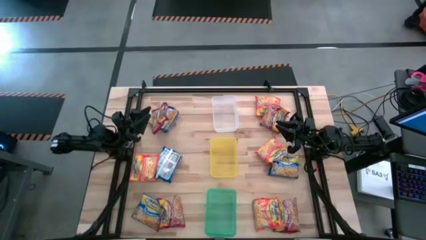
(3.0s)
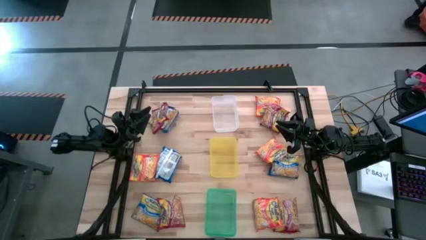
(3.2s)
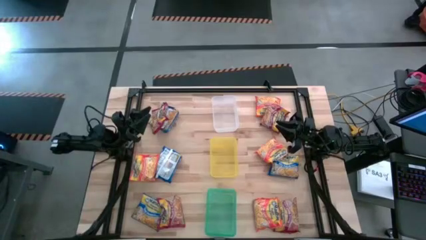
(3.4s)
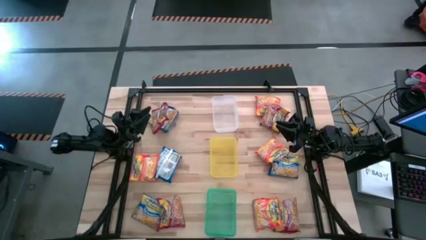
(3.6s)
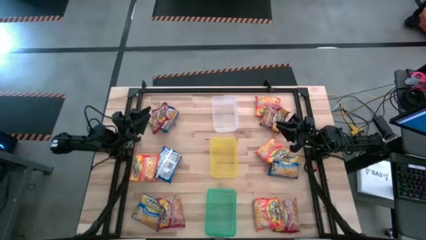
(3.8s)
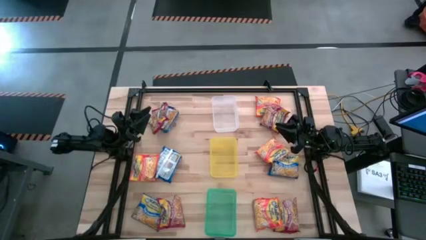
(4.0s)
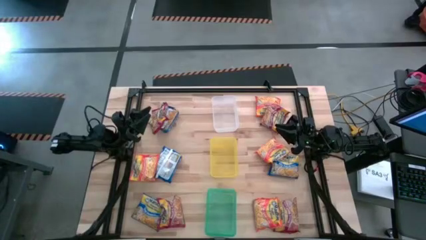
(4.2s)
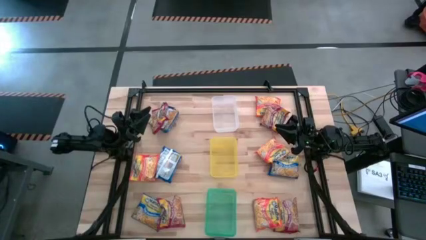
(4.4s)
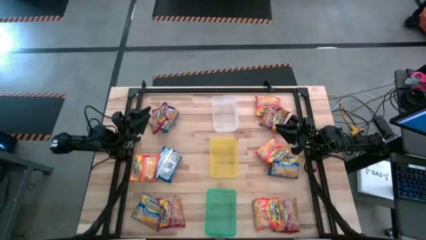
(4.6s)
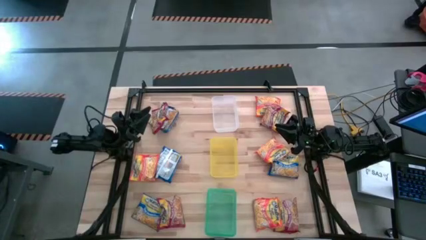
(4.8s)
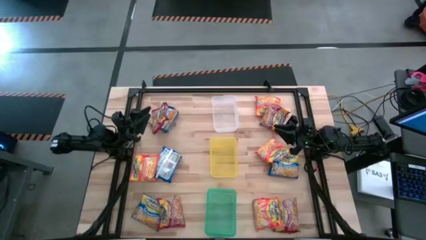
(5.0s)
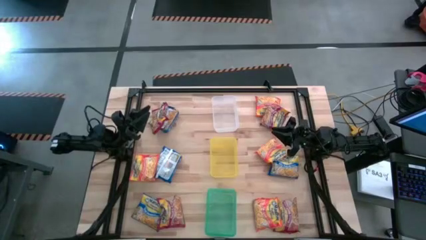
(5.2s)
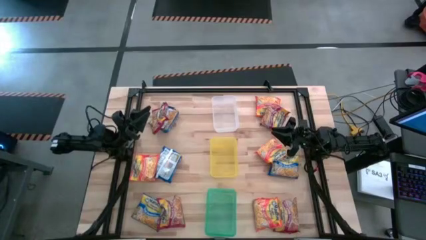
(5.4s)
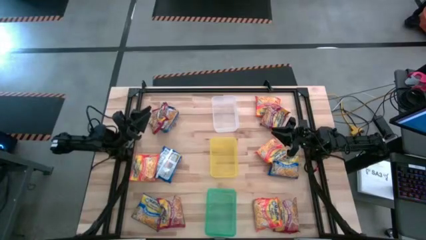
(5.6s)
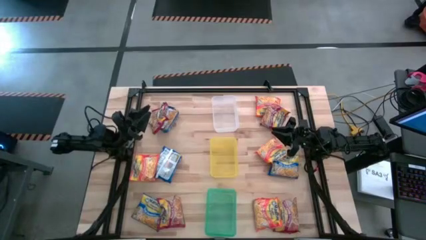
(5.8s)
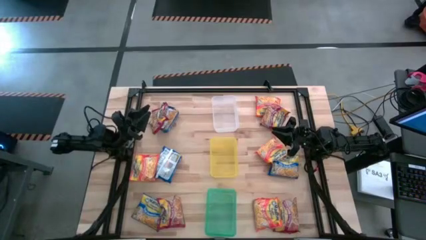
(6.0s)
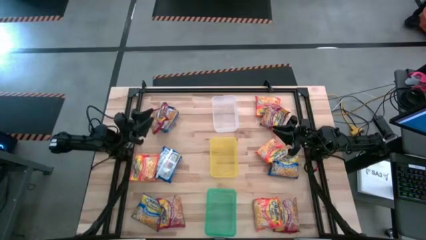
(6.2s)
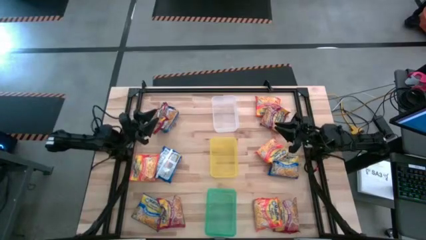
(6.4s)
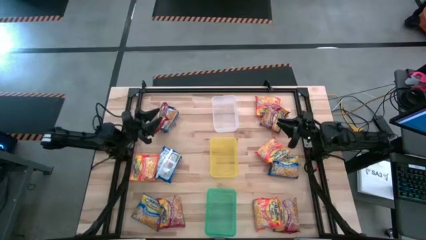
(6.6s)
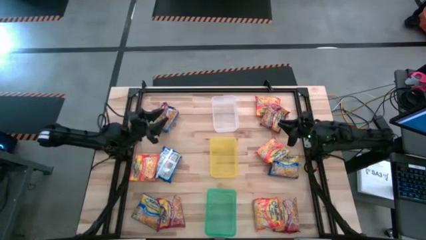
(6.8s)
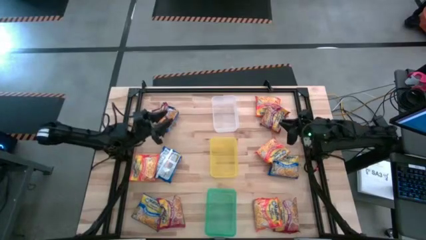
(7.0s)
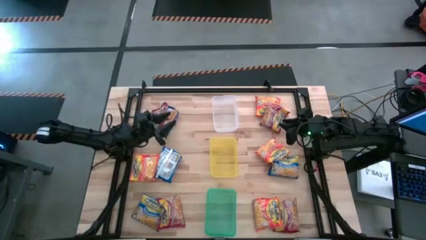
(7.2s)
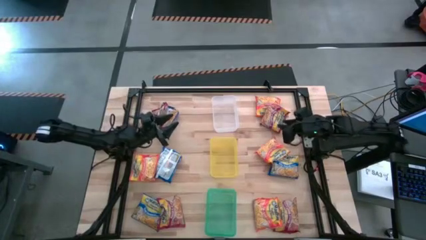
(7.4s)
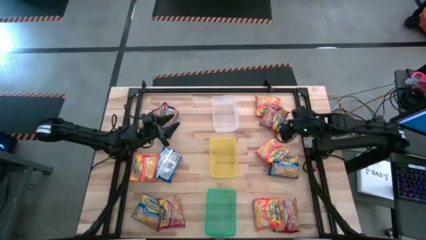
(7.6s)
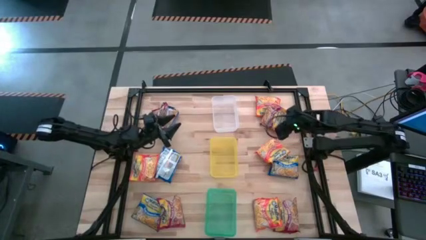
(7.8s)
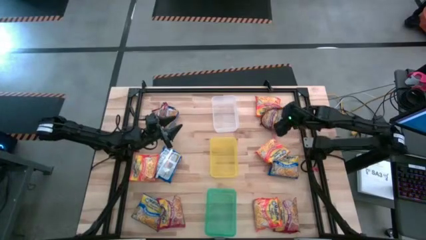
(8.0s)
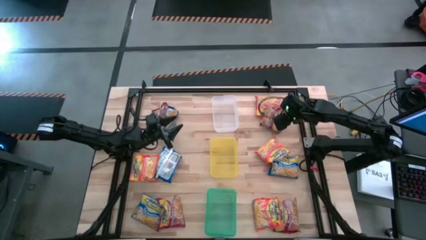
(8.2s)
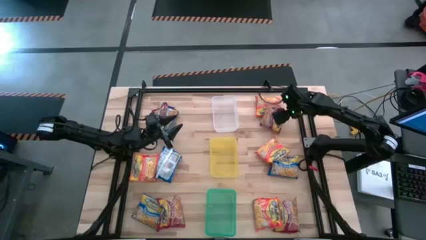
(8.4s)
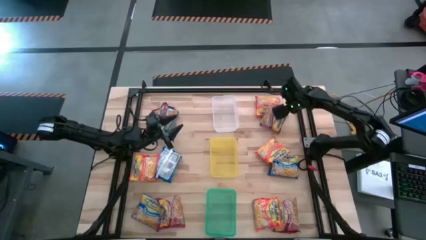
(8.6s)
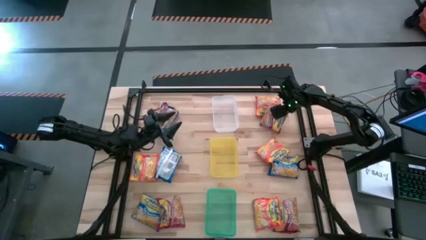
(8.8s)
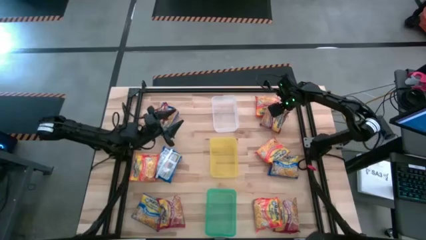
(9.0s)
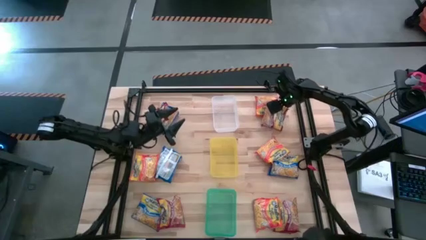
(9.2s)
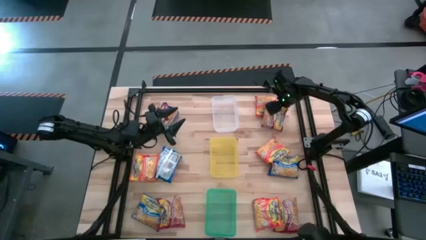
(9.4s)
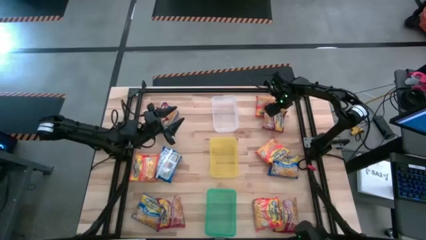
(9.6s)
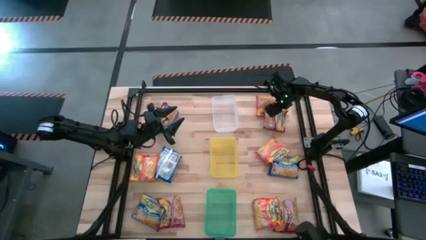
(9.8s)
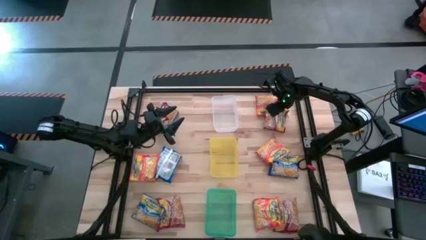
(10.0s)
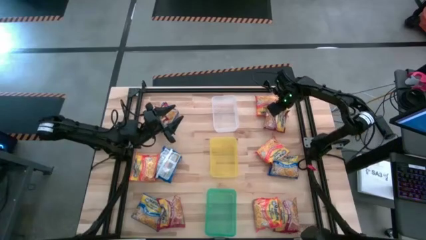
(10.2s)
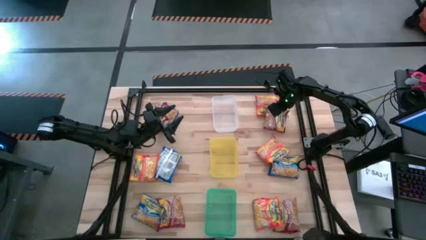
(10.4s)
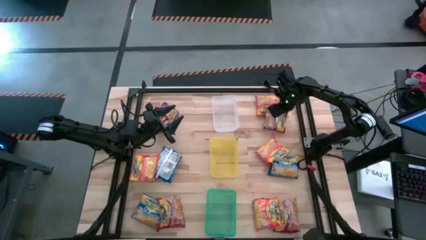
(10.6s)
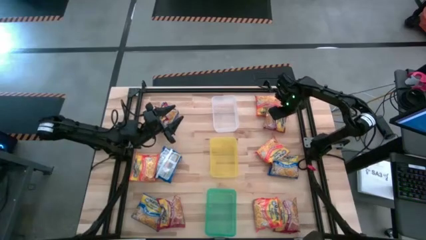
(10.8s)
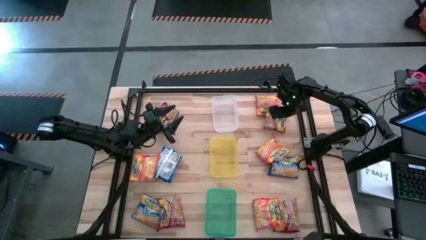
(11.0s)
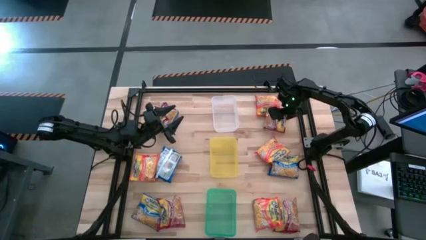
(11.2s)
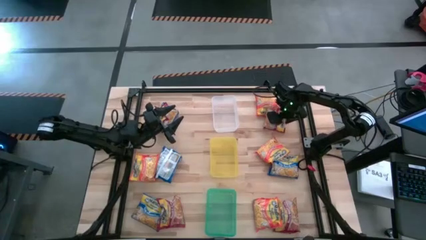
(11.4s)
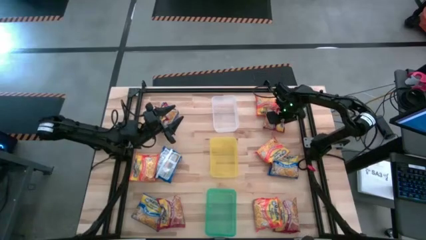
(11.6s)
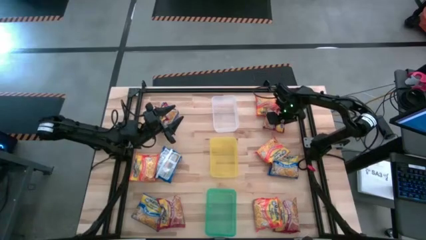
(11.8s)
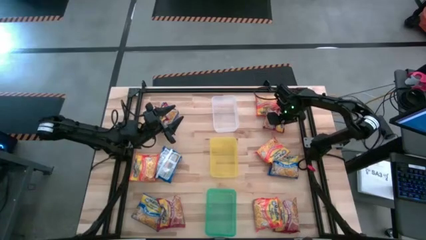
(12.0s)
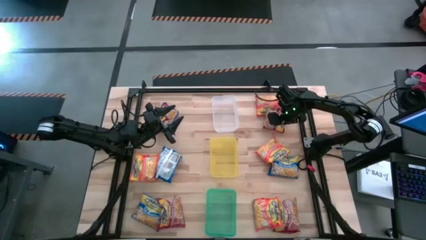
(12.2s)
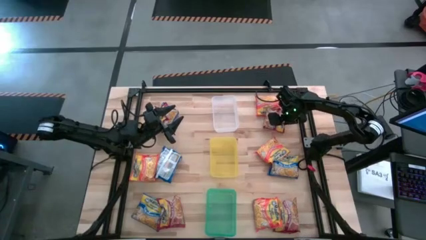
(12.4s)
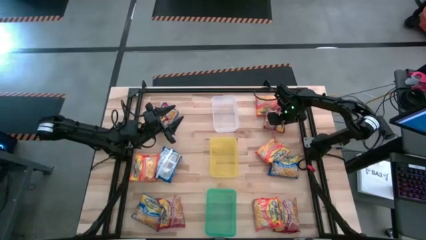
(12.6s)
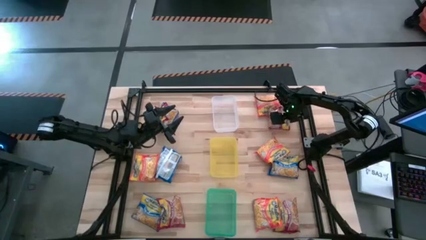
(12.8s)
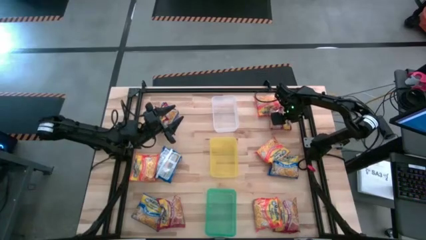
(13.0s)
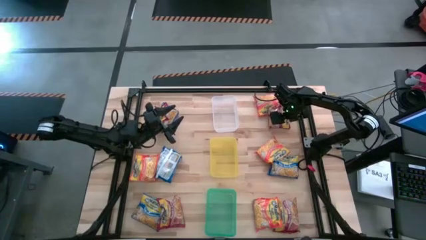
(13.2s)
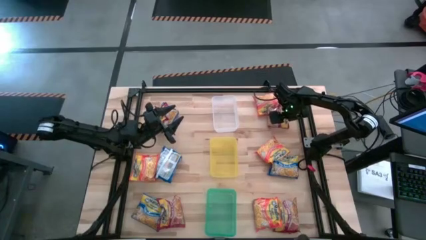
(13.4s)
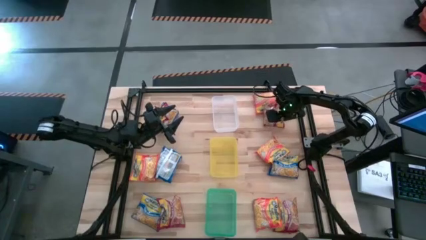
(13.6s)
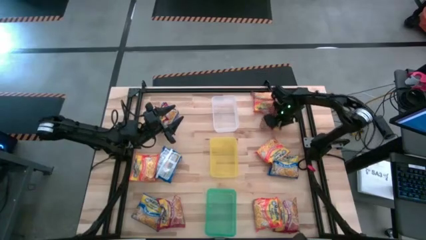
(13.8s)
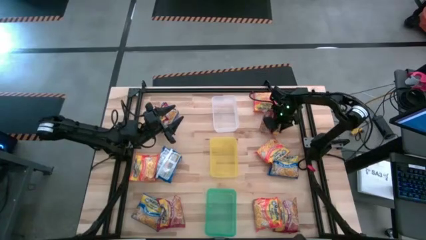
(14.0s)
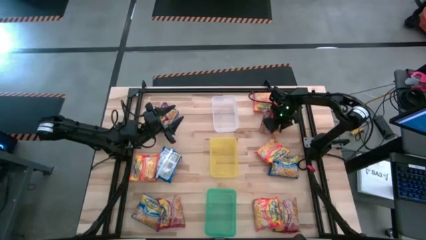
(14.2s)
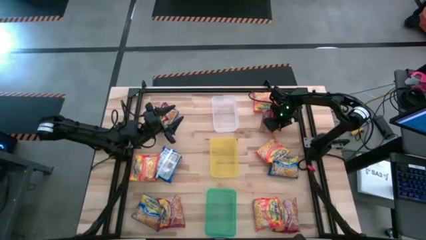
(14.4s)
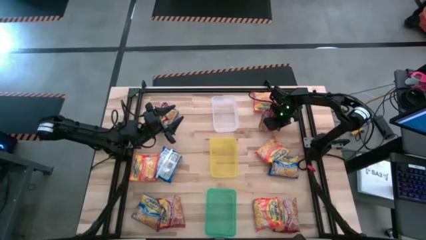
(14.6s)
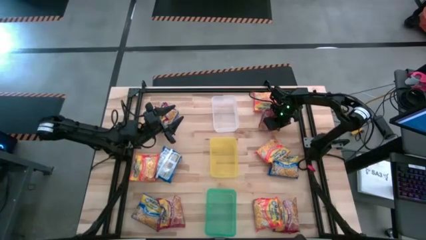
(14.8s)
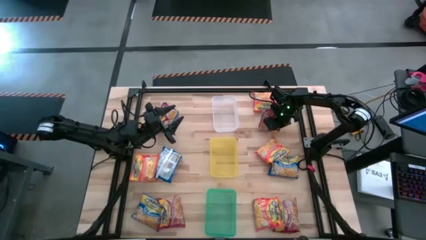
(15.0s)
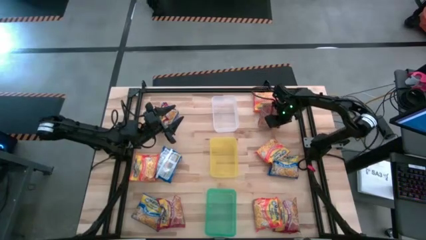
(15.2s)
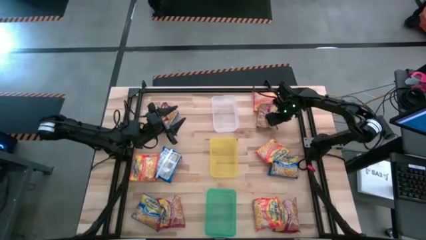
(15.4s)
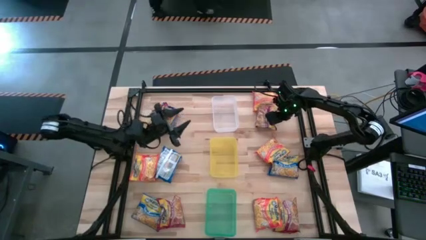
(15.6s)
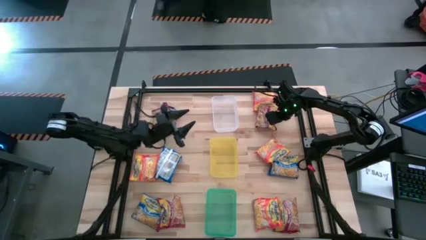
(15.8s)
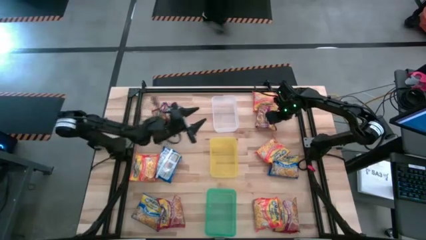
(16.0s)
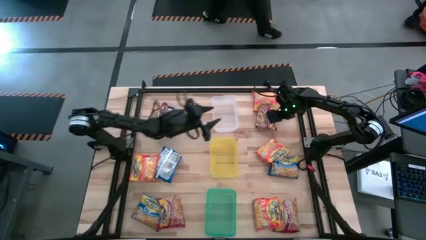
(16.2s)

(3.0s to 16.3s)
Task: Sort Maruchan noodles
Put the red noodle pack into the transparent bin
